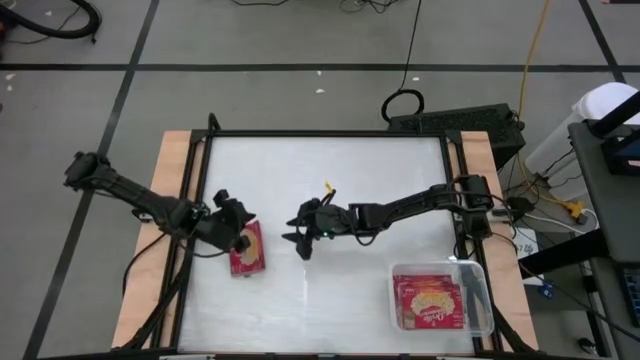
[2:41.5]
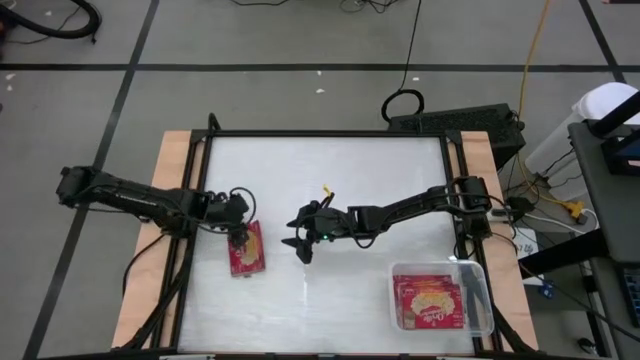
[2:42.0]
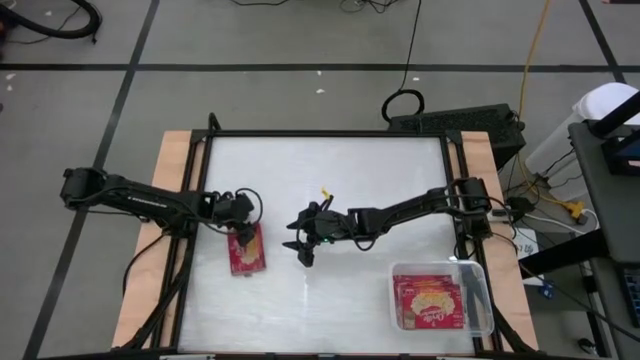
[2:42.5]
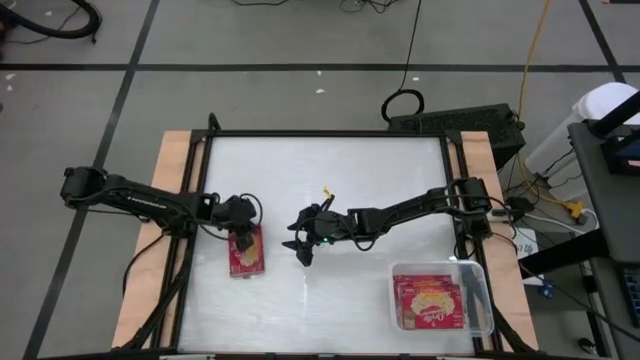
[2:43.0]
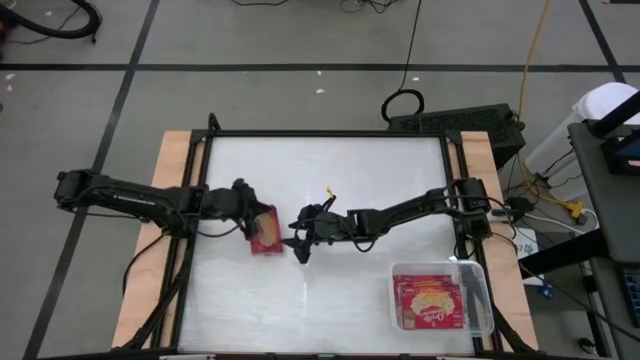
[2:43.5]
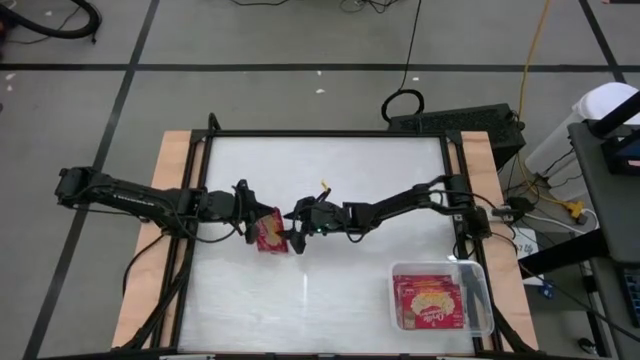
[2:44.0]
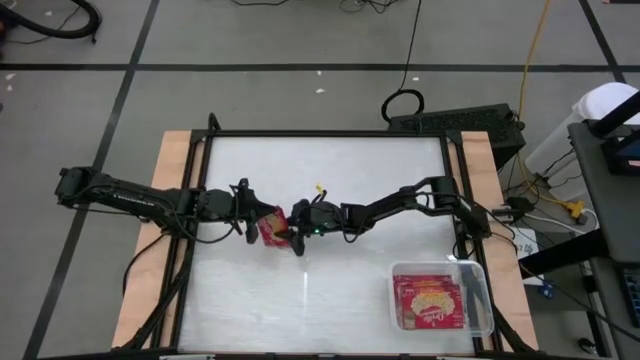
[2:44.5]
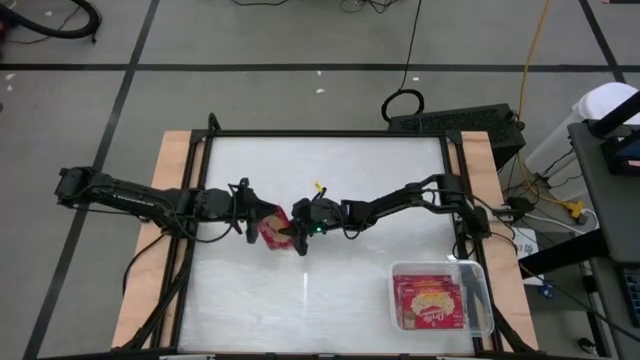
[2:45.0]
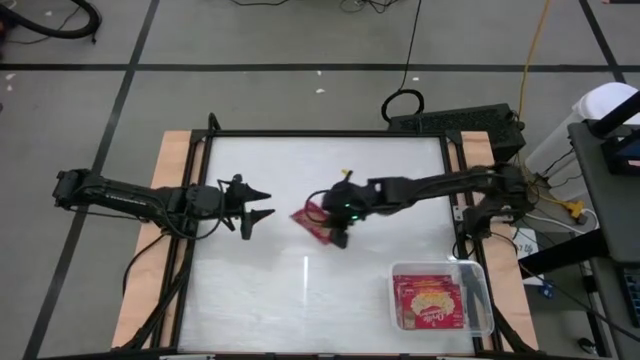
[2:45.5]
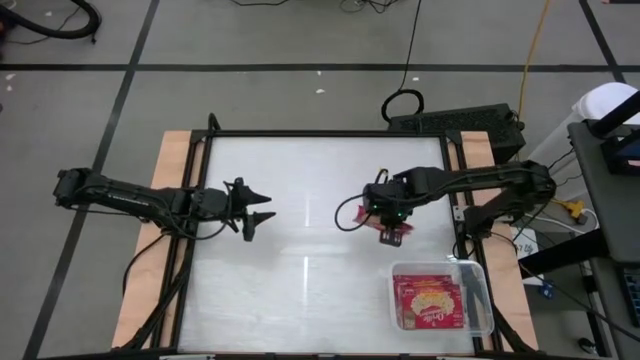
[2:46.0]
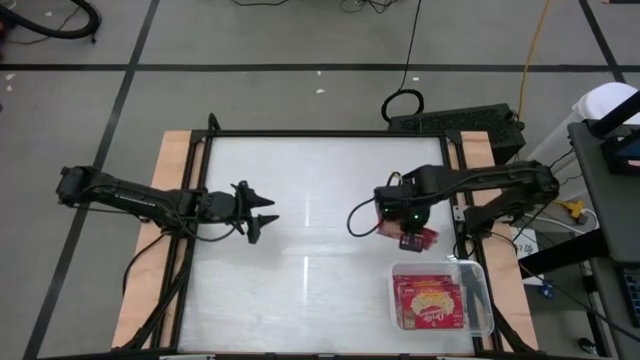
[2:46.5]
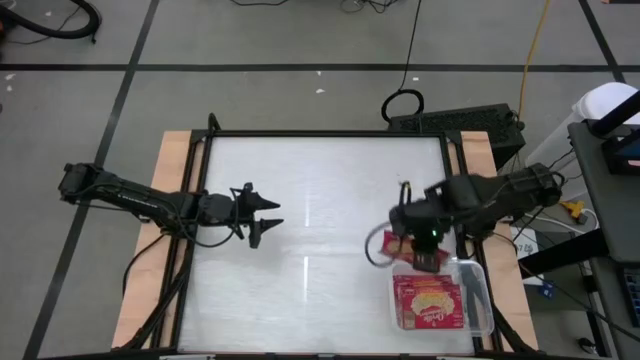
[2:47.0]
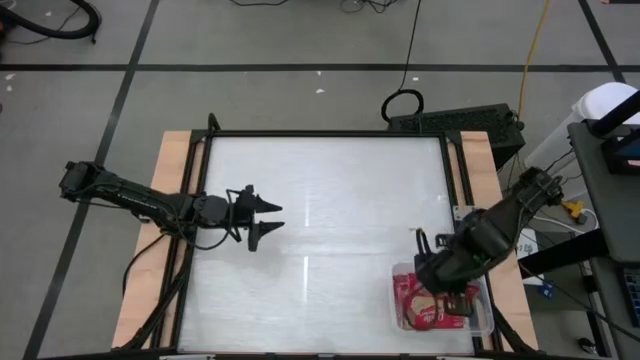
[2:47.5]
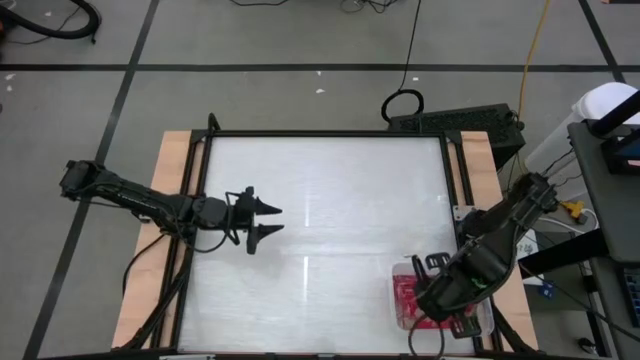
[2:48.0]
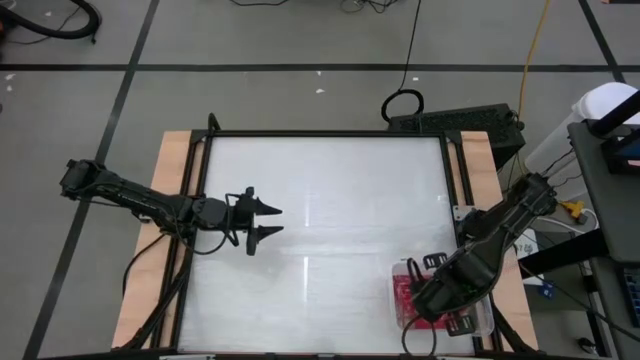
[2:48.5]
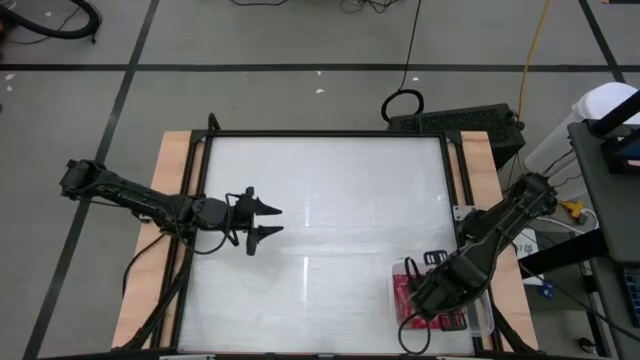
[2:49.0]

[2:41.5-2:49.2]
Task: Sort popcorn bags into baskets
Put the red popcorn pack into the transparent bin

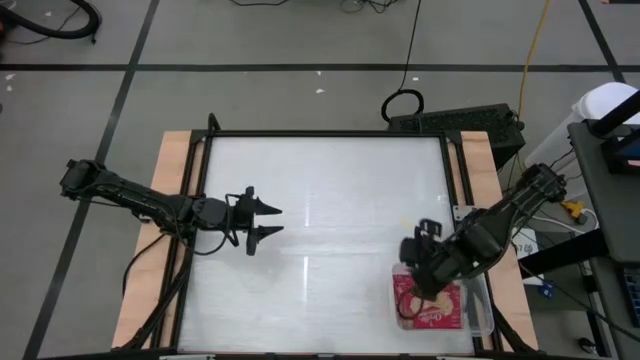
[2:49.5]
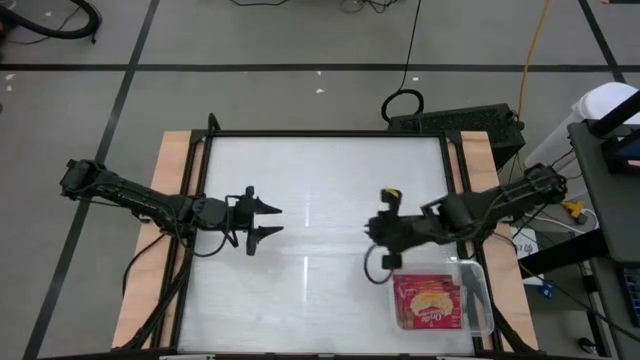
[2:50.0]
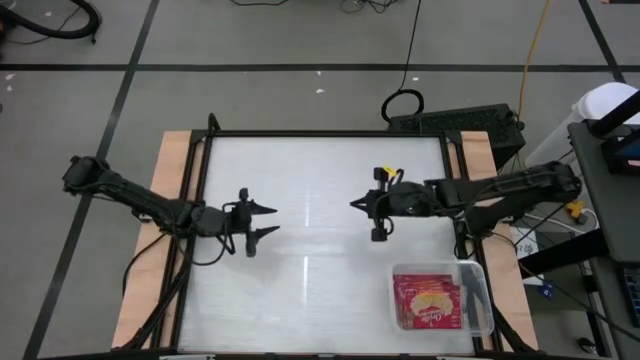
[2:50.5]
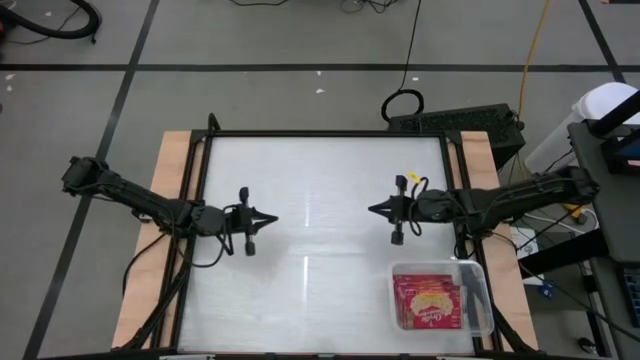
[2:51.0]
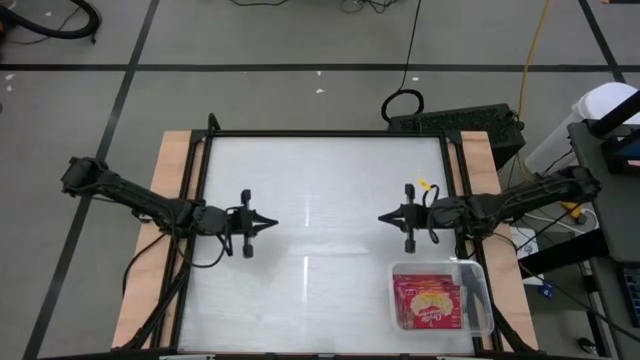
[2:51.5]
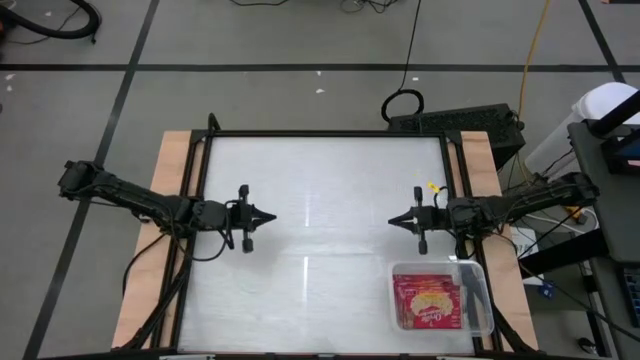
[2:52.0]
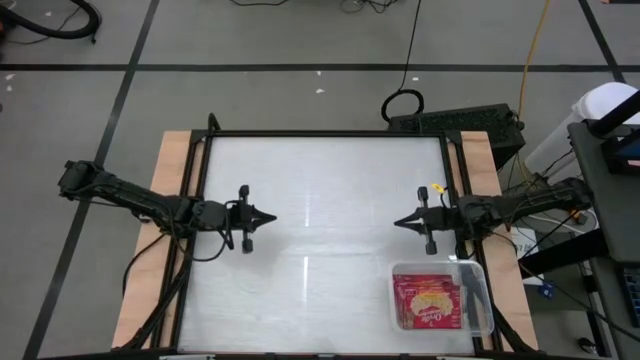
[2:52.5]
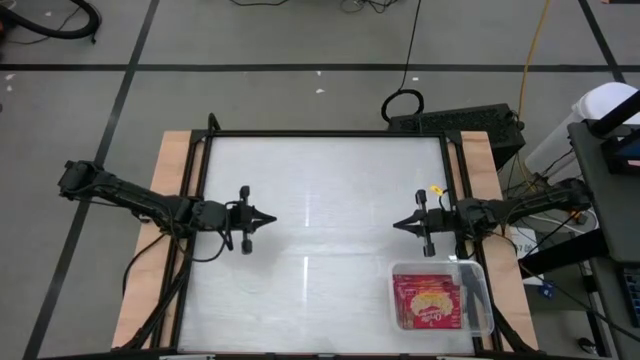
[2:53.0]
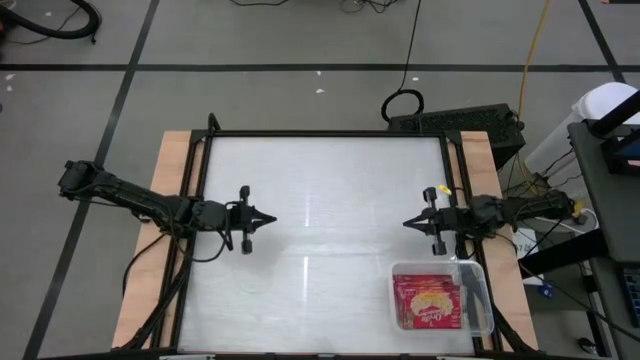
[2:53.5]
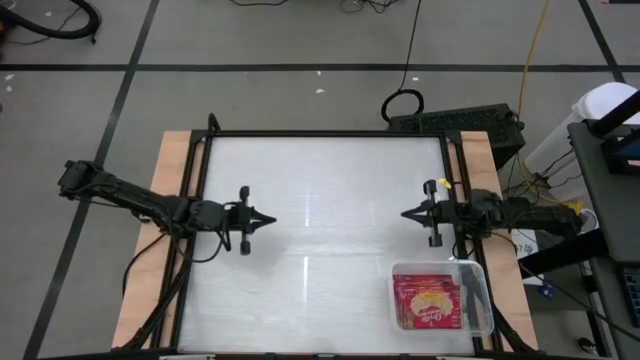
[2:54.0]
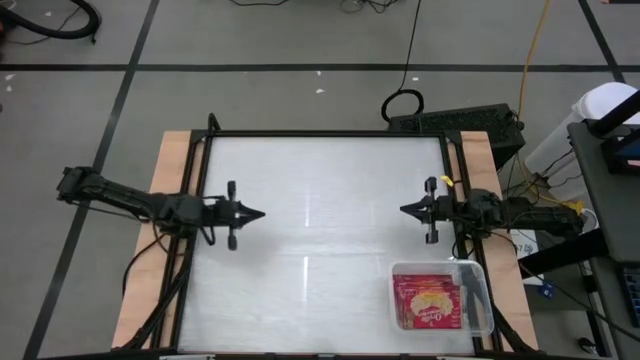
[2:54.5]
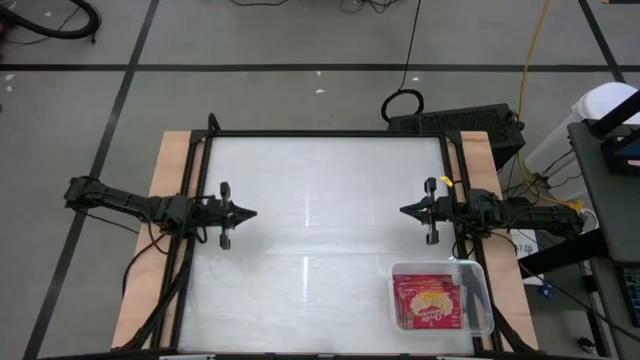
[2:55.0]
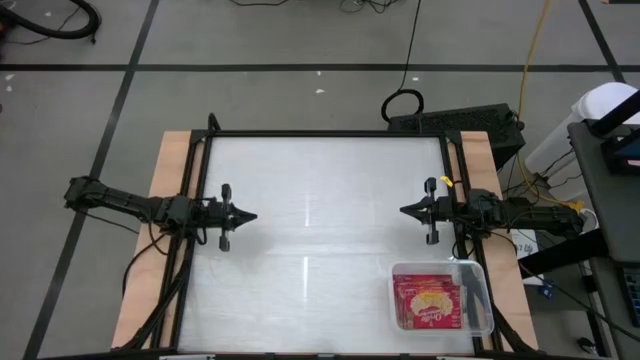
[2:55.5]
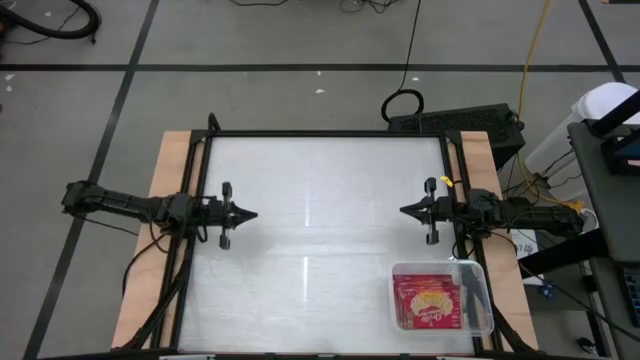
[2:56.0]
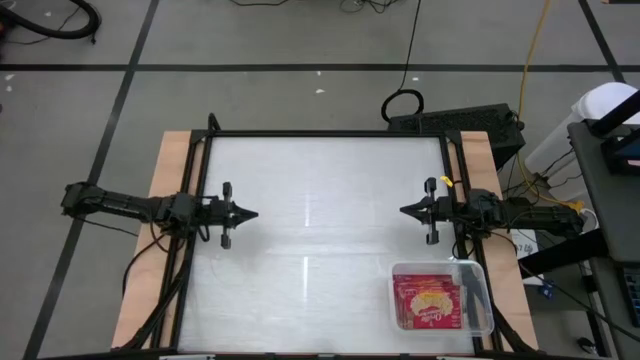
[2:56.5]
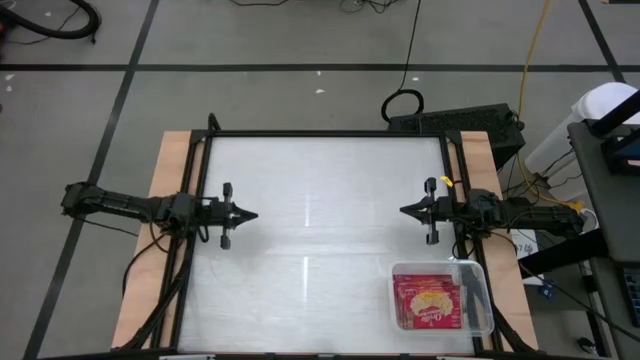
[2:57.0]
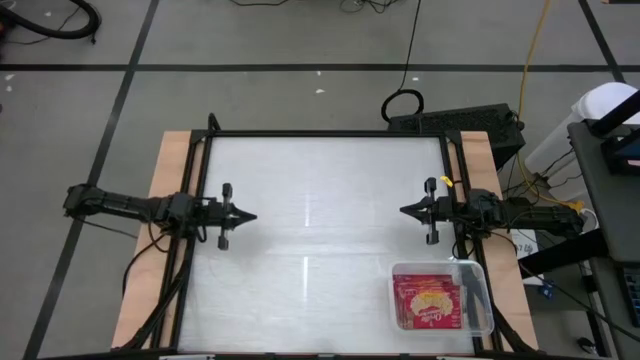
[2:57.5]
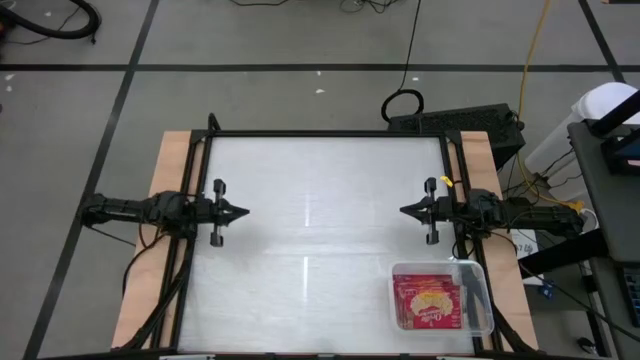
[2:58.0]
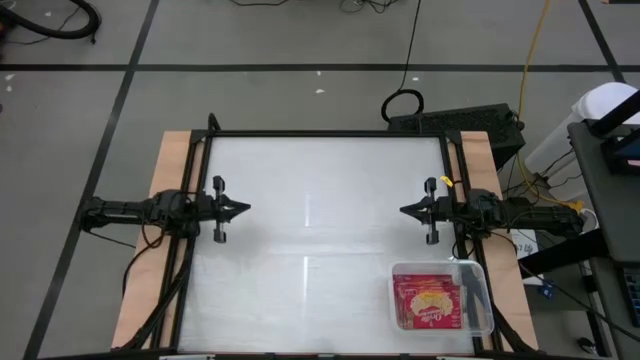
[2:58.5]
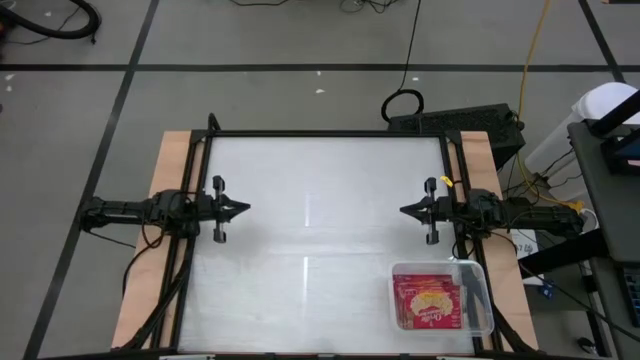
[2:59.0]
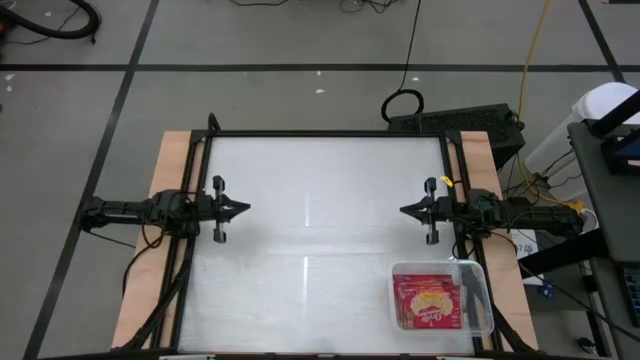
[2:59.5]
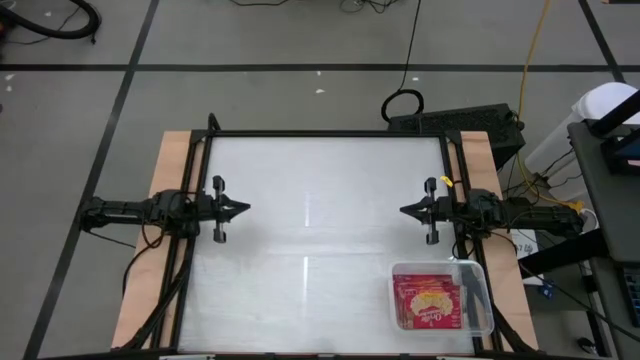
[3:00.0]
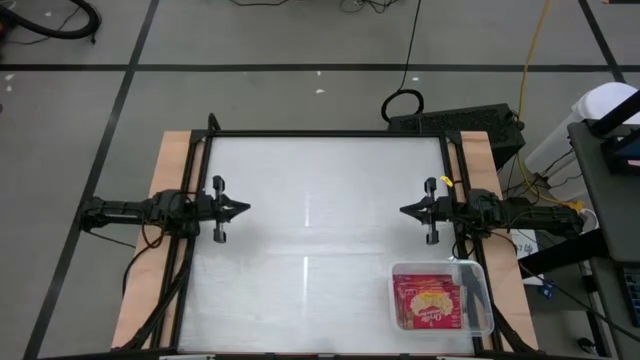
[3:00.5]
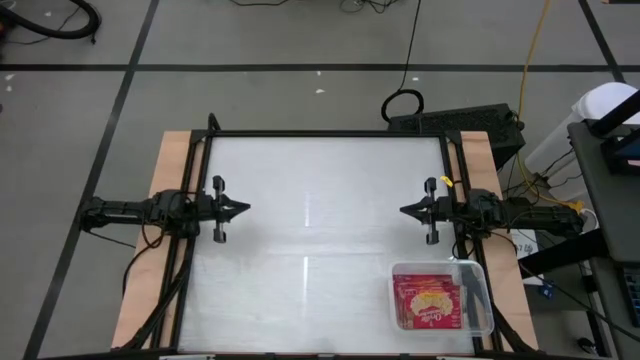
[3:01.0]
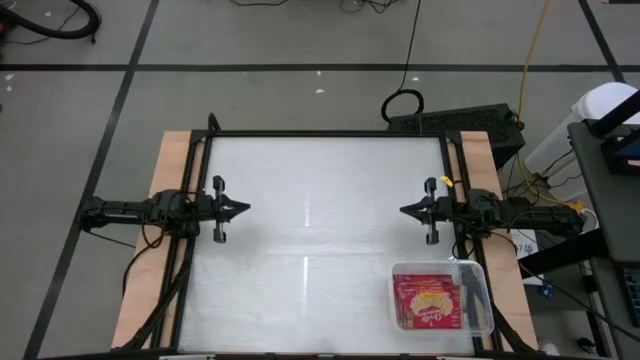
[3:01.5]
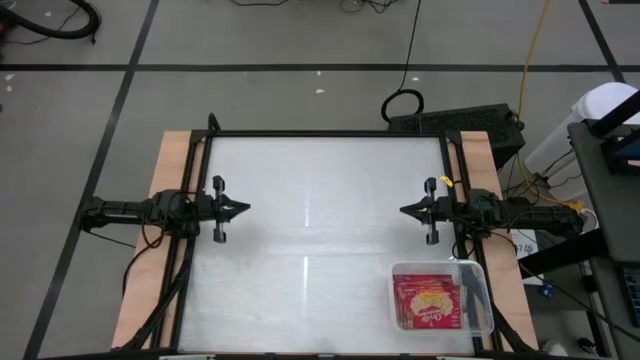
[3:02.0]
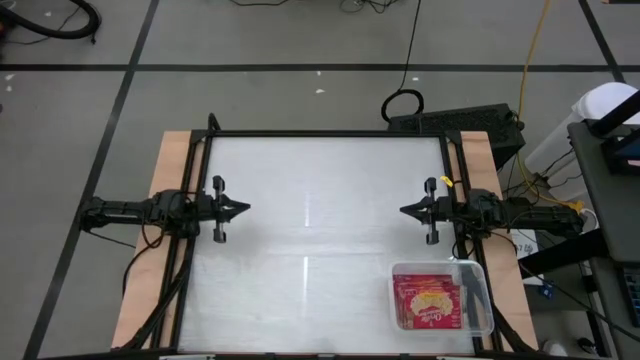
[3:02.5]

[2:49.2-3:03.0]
Return to Home Position
